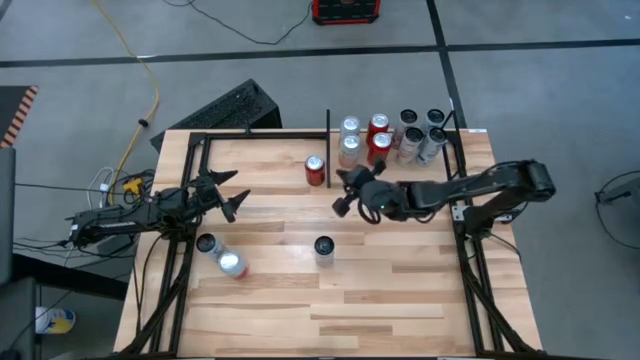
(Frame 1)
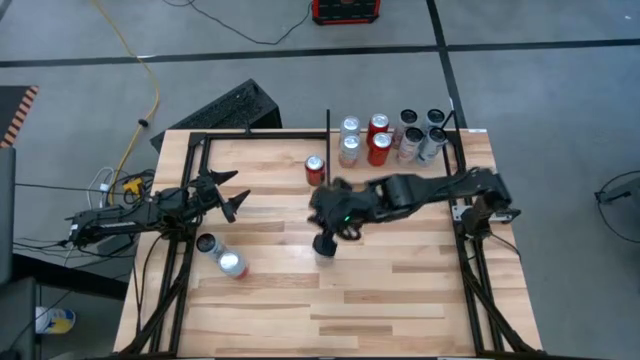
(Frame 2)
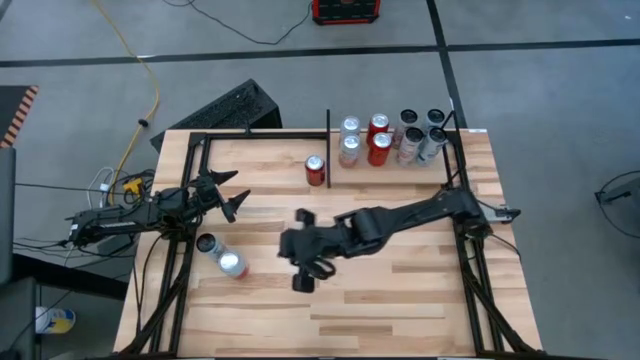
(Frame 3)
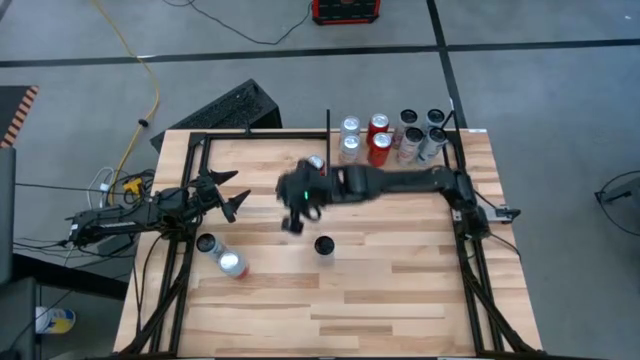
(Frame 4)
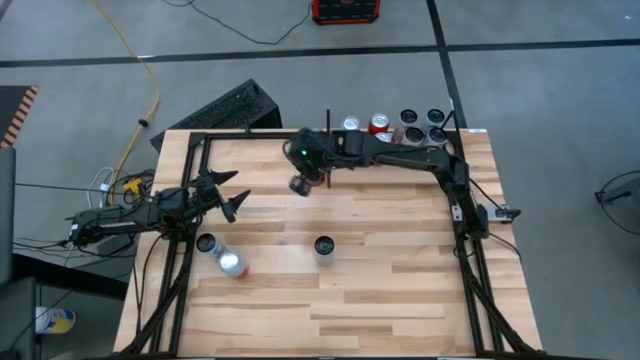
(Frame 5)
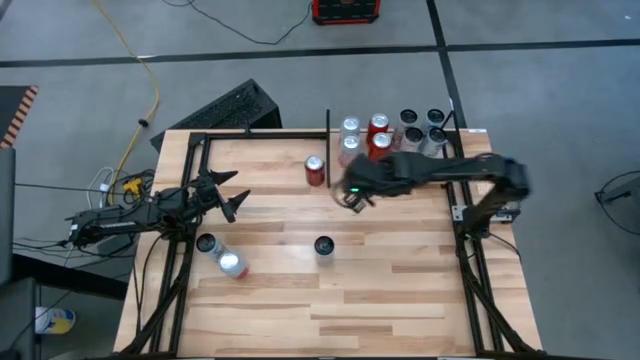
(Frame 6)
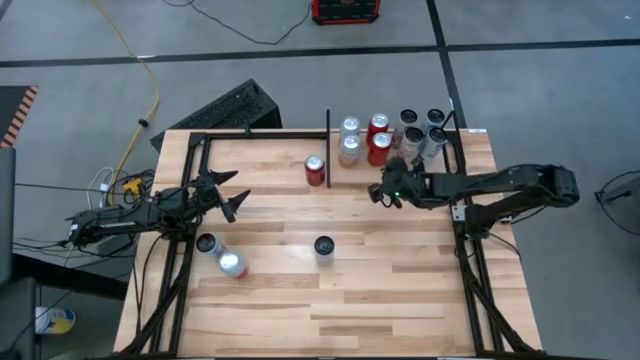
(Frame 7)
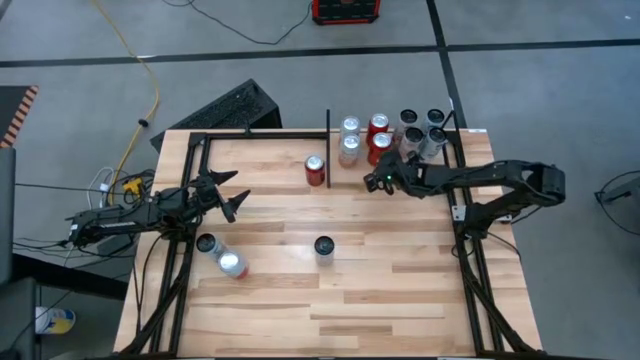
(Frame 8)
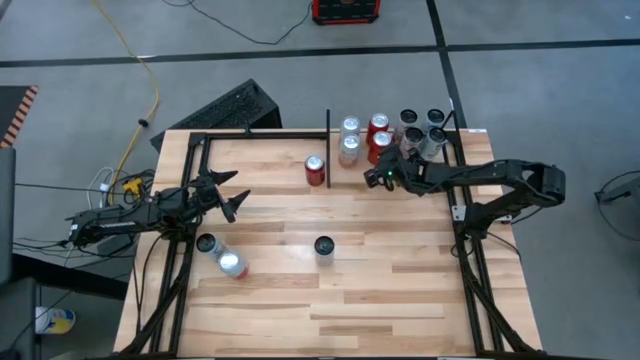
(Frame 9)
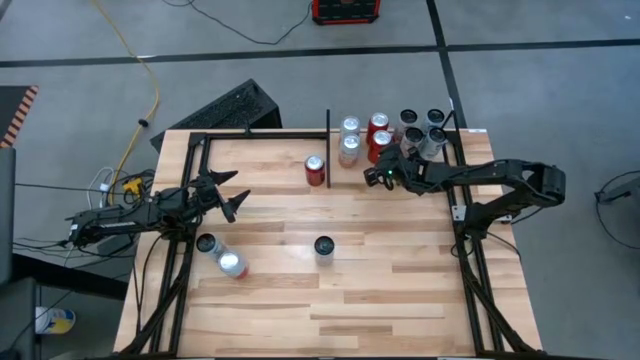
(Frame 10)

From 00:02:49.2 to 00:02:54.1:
Task: Place canned beverage on shelf
Adjust the red soda can on the shelf

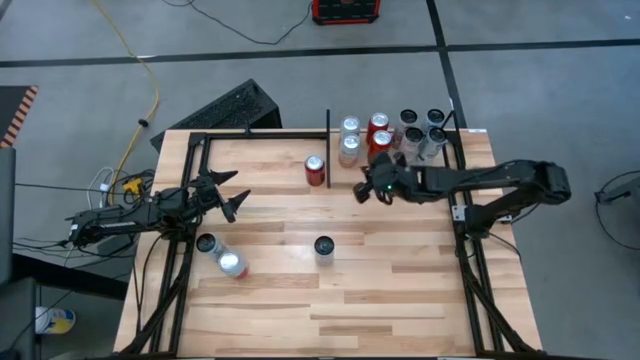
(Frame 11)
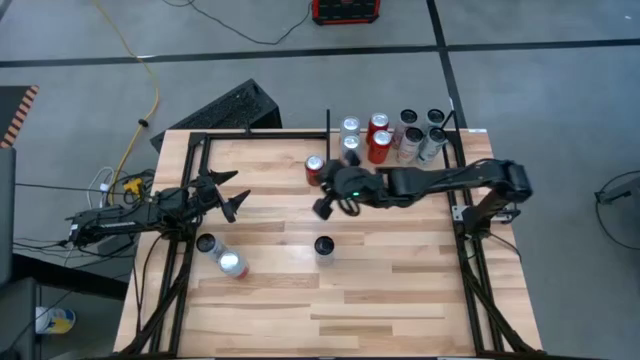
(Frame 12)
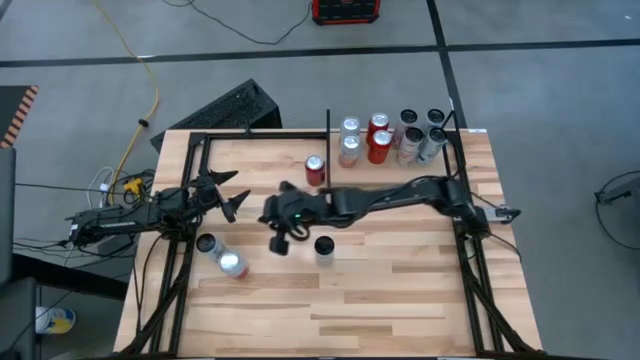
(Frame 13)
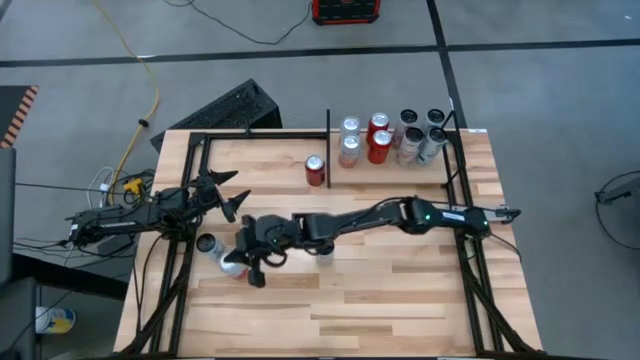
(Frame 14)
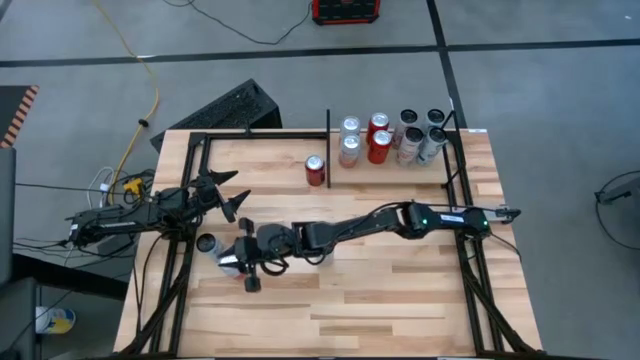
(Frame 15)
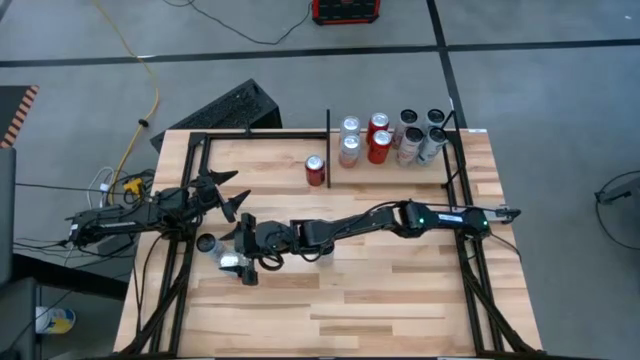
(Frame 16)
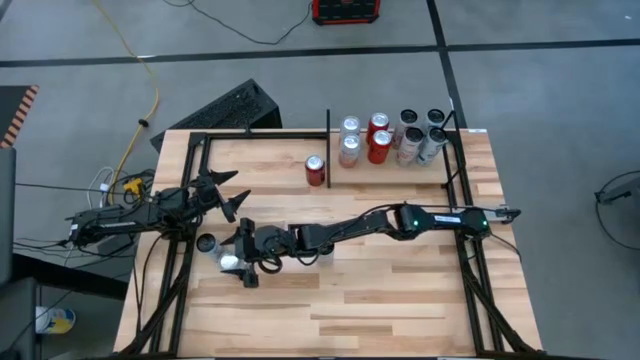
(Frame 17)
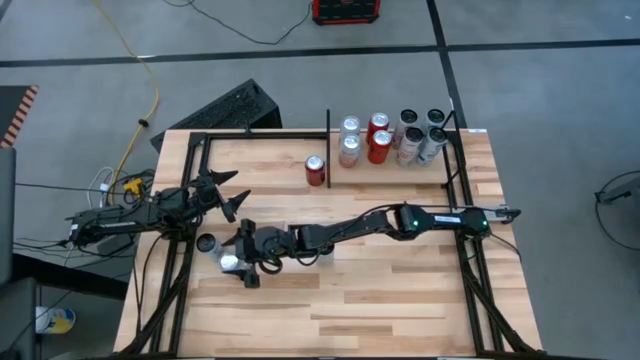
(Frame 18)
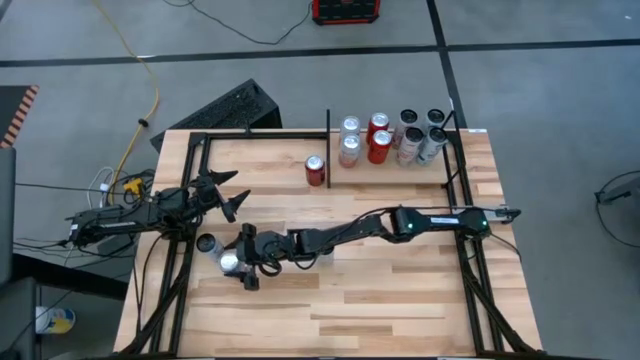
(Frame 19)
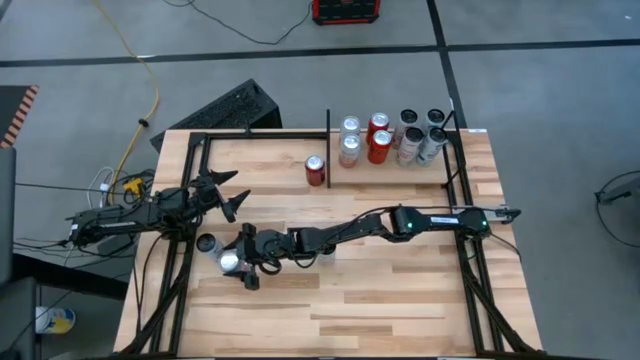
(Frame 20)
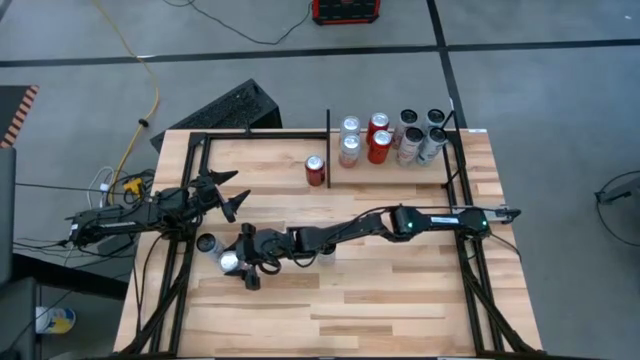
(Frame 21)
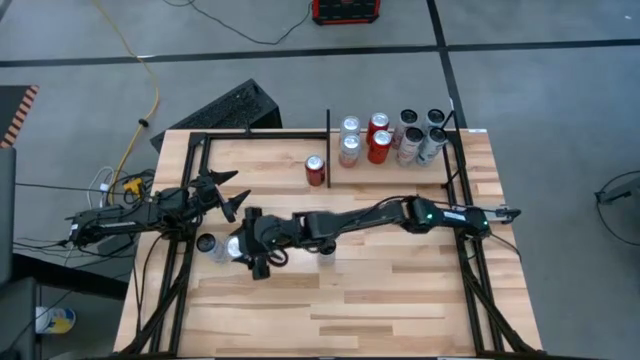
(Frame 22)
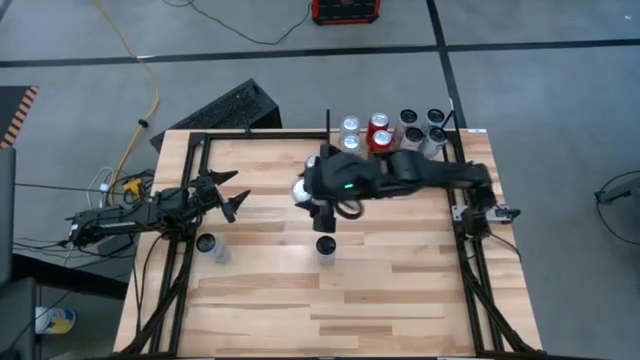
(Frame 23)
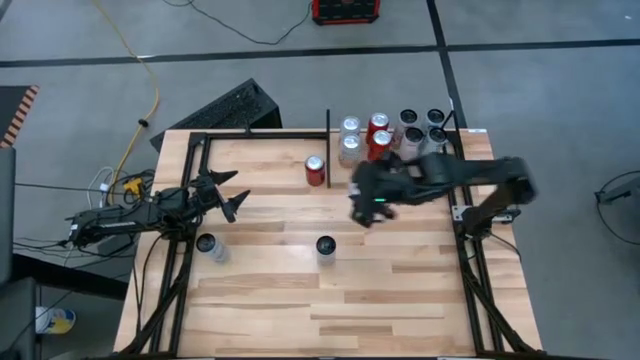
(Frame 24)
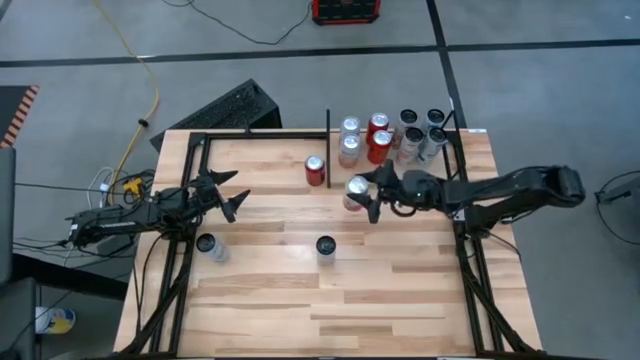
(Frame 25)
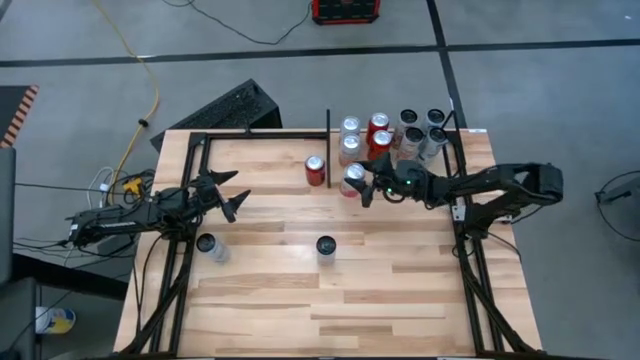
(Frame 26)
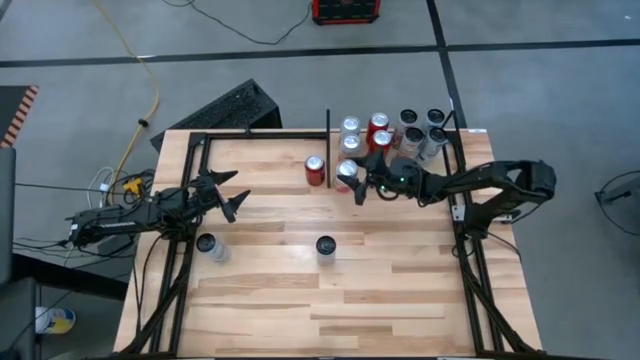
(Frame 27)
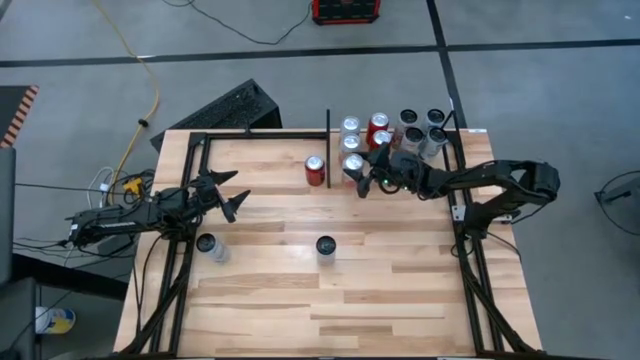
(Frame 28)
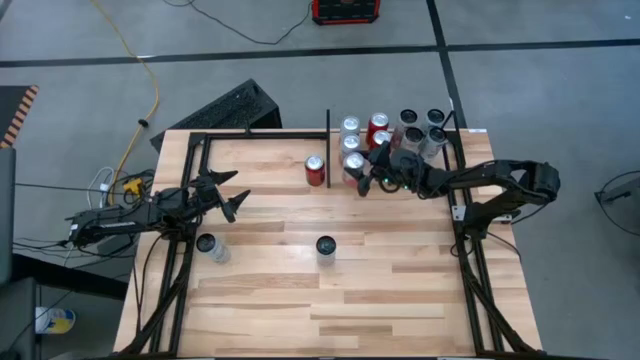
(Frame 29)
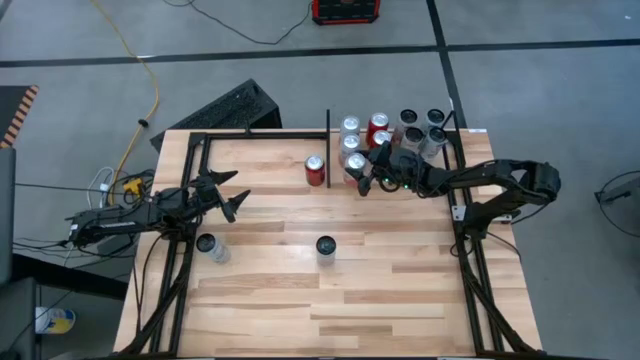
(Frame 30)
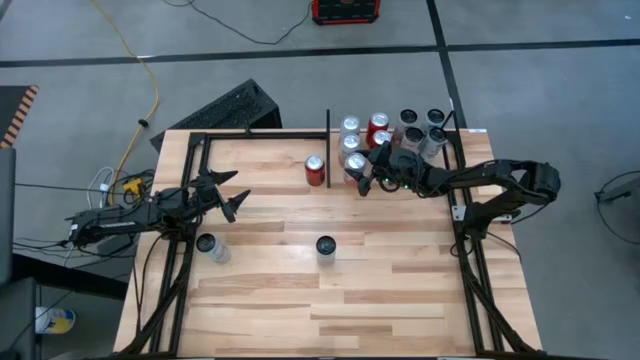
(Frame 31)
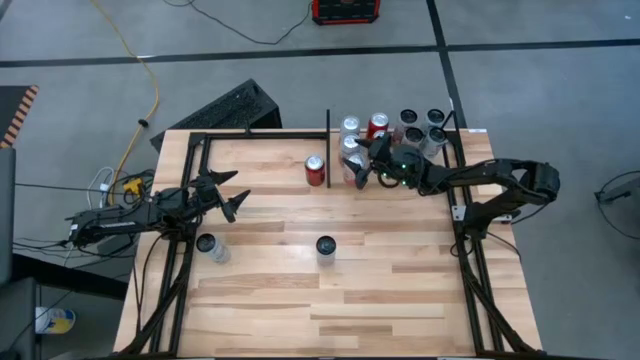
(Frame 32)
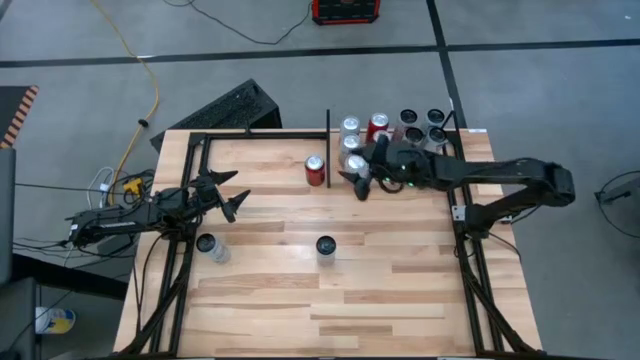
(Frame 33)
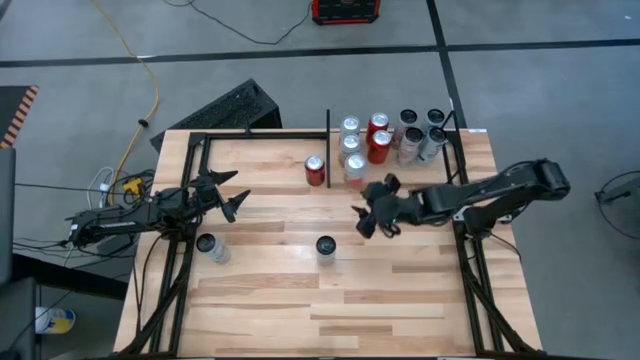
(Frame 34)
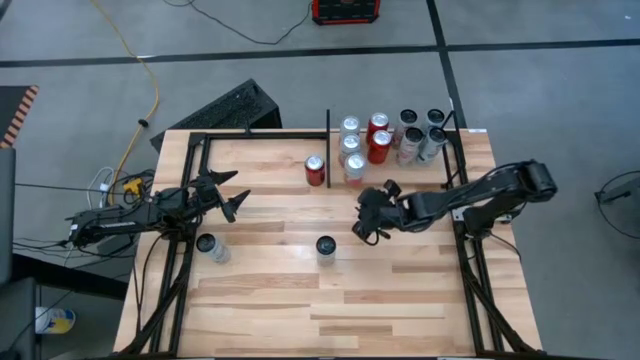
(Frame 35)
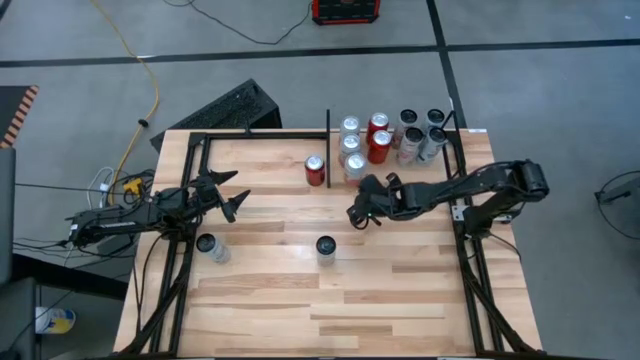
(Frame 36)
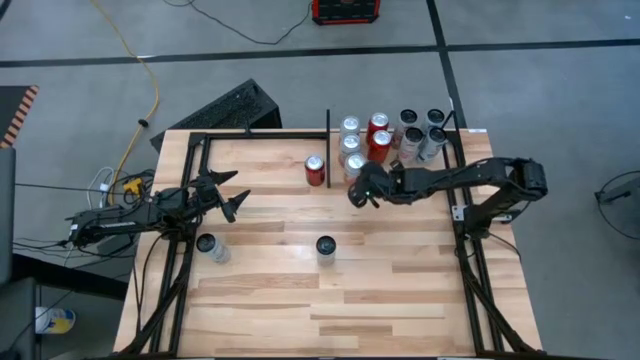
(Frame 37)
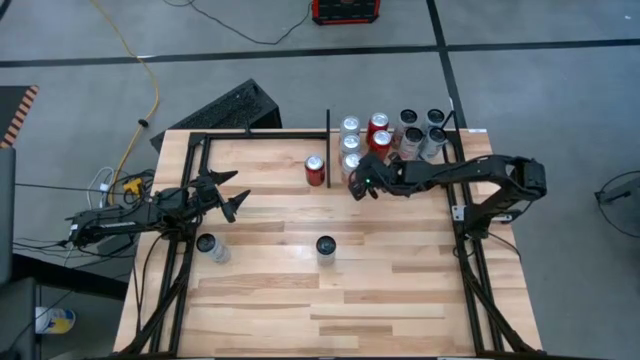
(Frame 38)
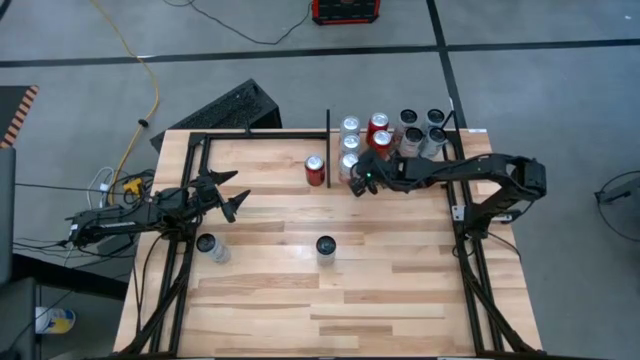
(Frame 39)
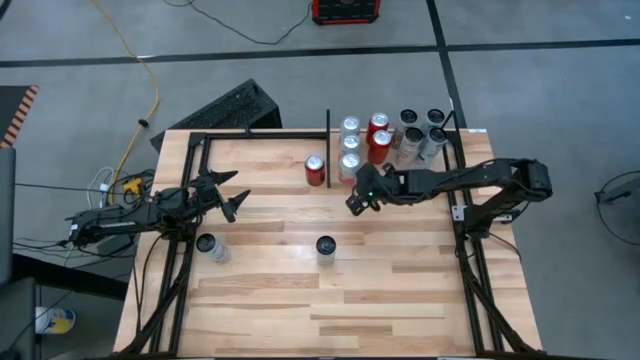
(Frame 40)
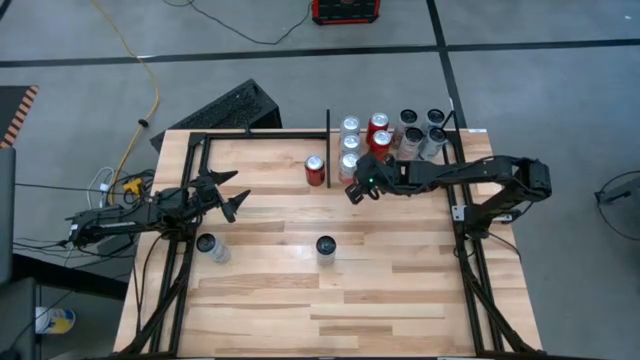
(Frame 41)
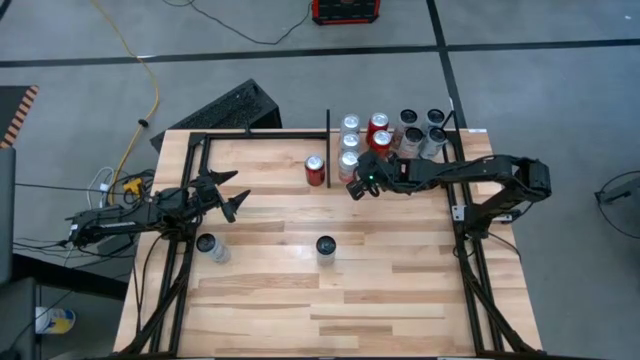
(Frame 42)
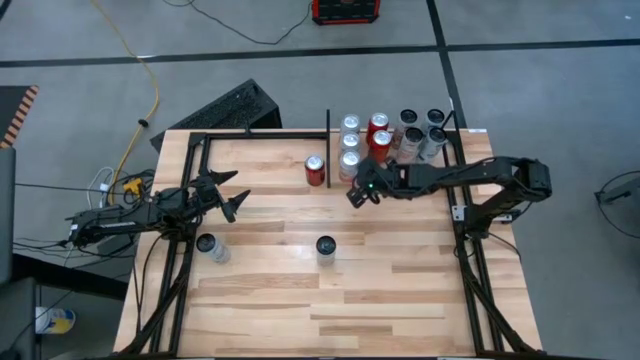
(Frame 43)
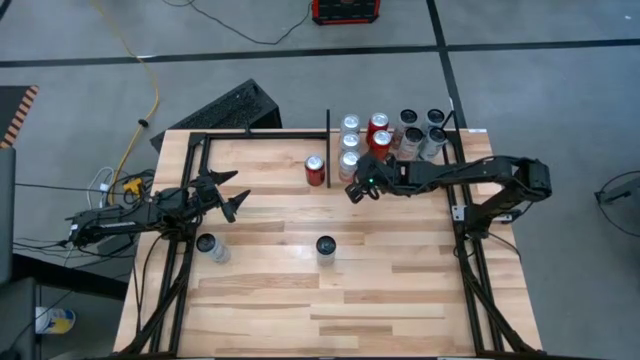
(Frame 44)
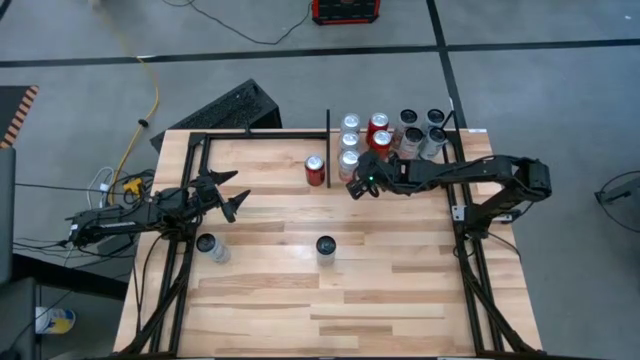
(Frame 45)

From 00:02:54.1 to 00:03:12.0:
Put the white soda can on the shelf
